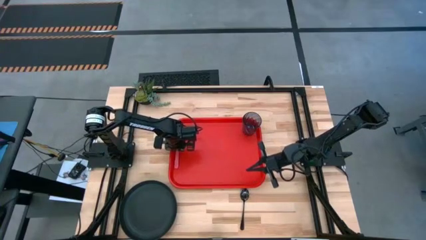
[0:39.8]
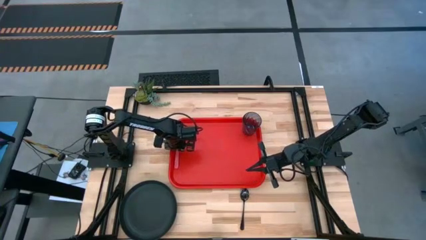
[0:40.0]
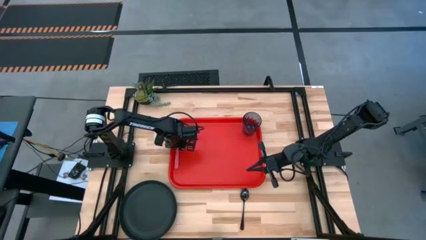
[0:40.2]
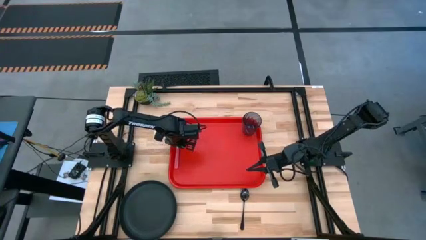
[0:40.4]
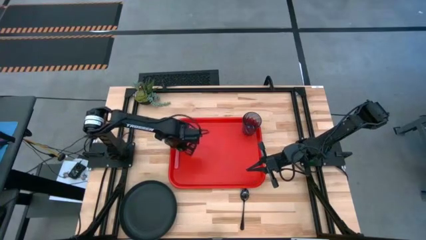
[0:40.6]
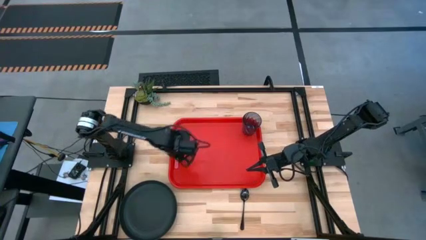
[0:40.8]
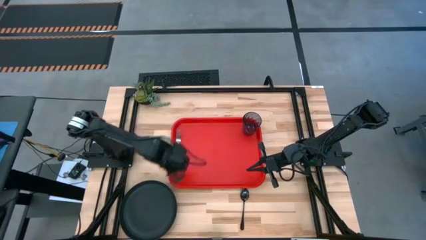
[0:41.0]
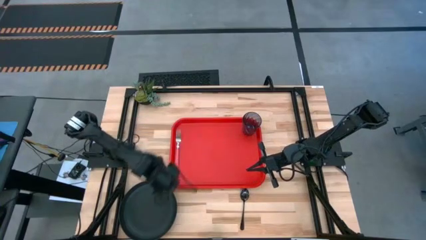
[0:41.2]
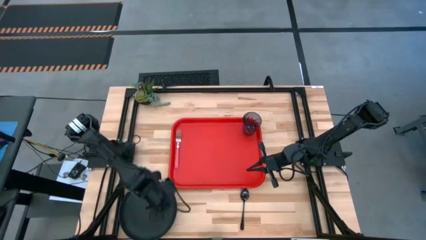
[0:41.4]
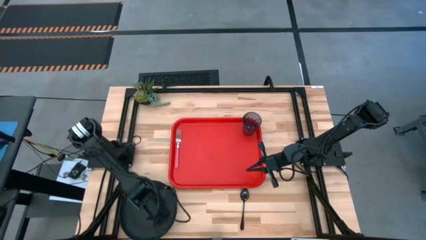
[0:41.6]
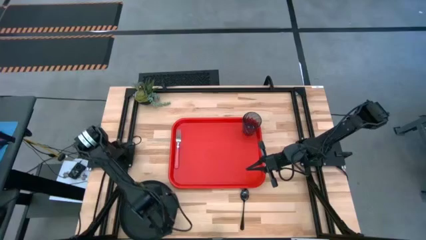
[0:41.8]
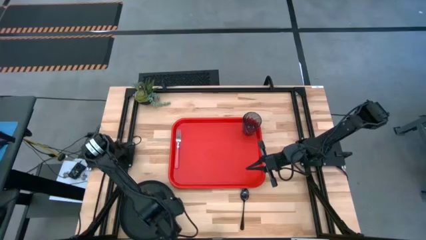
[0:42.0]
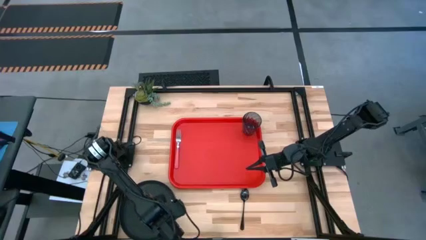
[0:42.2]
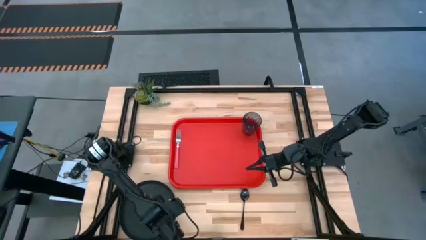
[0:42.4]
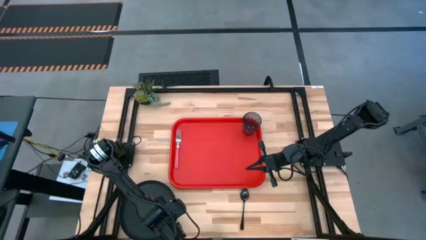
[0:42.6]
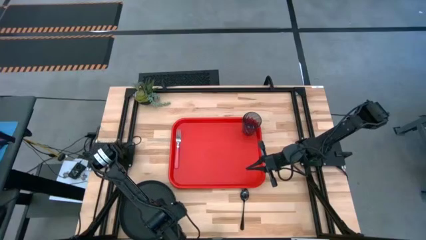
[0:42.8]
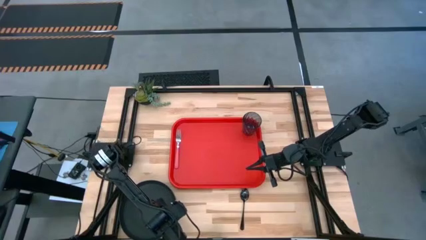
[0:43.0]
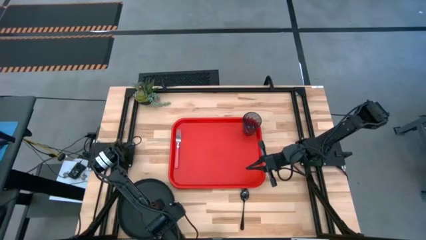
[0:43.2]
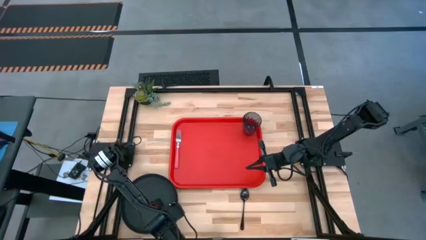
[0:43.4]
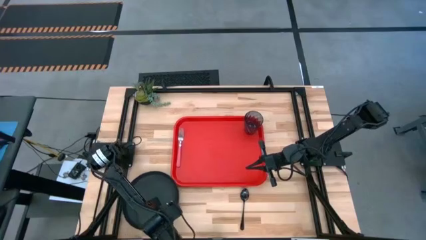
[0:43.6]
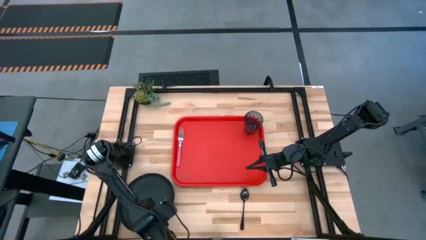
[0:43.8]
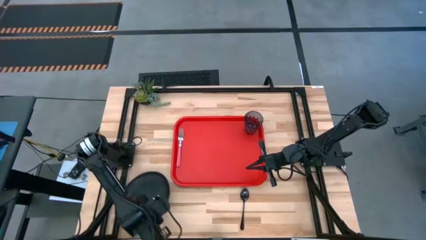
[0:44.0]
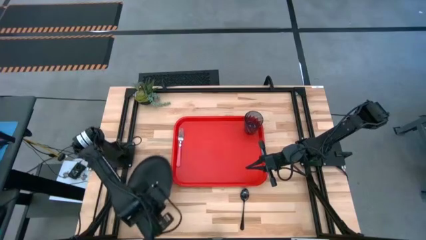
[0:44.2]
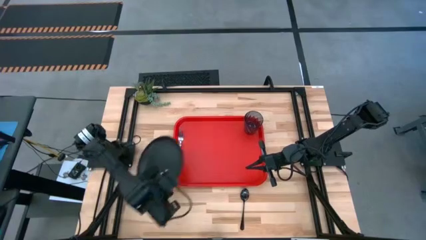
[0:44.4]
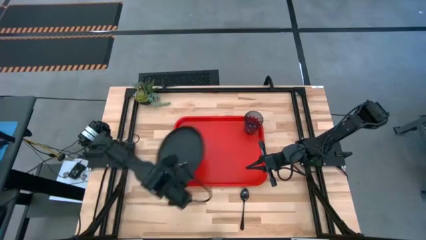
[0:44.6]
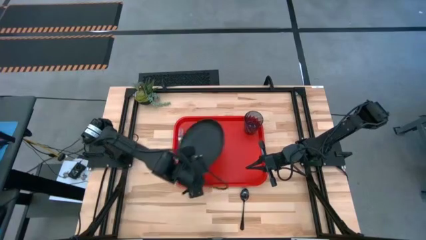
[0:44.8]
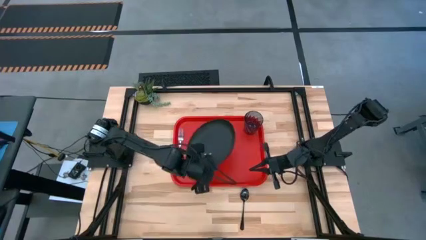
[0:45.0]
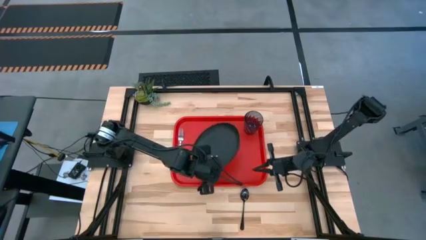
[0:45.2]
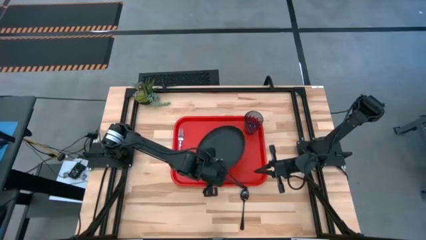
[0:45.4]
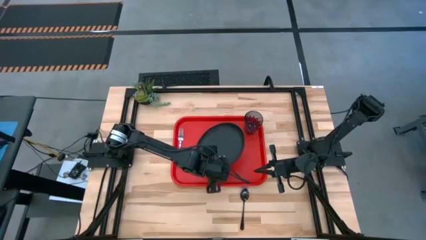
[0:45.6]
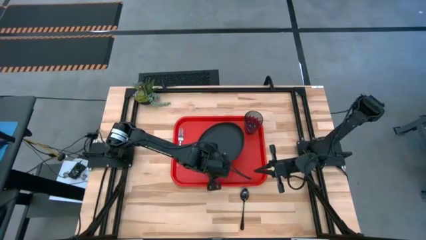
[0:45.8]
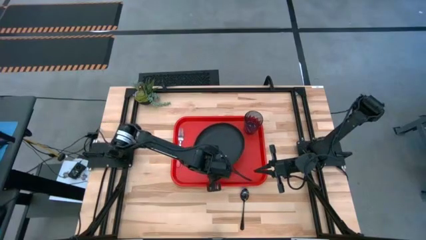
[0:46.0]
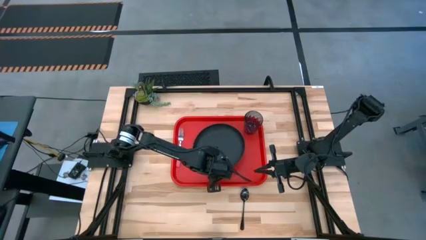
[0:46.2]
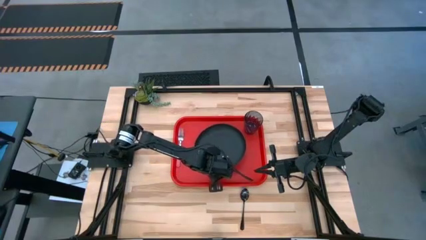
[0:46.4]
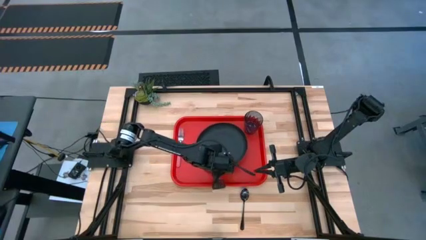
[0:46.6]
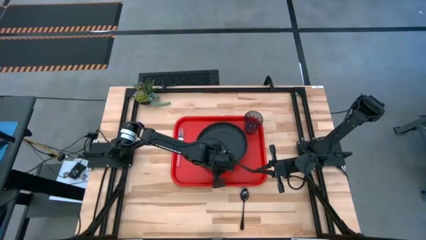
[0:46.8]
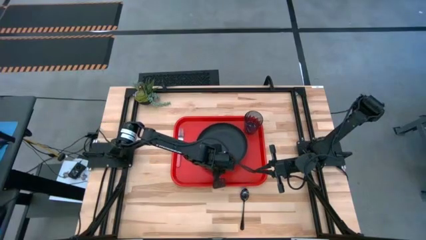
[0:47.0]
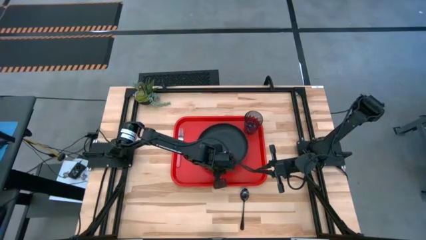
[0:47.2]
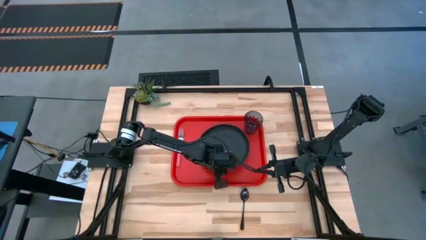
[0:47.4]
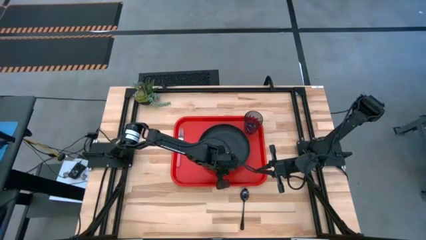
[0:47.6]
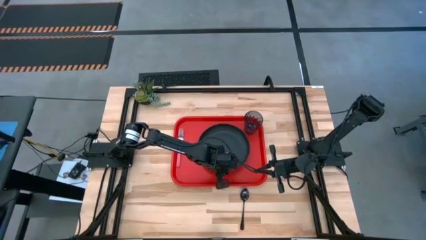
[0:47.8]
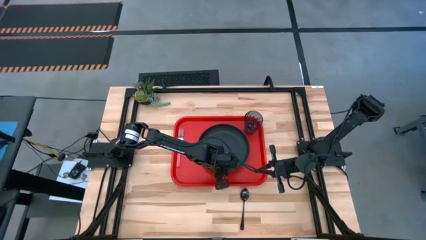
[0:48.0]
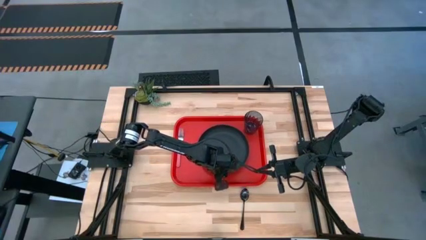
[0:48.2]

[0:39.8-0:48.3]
Task: Pick and place plate/cup/fork/spoon on tray
Put the black plate to the right of the pink fork on the red tray

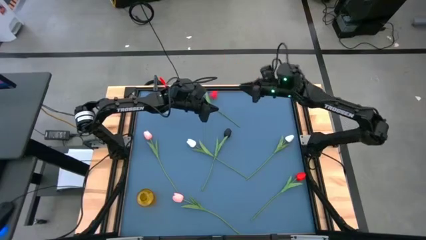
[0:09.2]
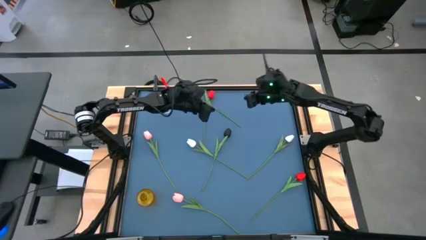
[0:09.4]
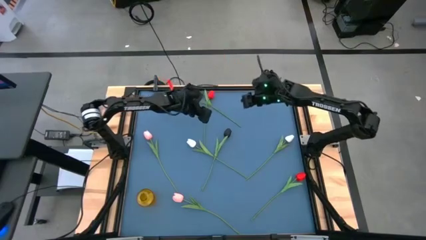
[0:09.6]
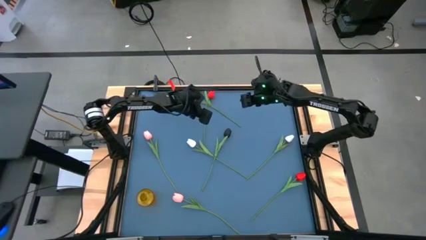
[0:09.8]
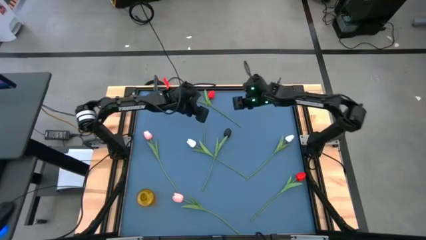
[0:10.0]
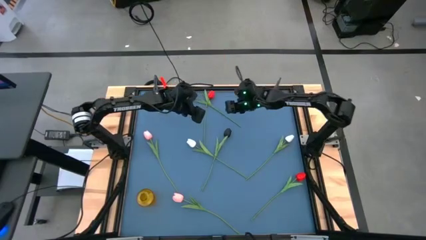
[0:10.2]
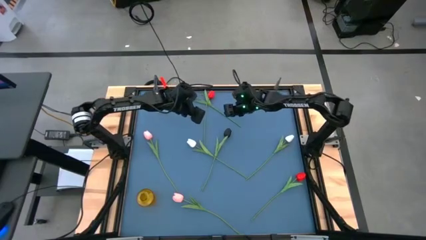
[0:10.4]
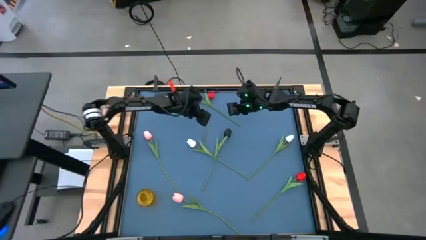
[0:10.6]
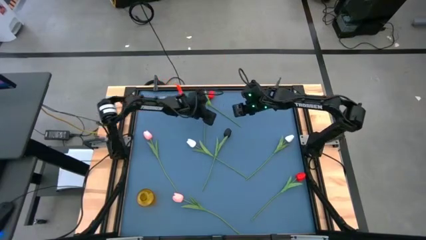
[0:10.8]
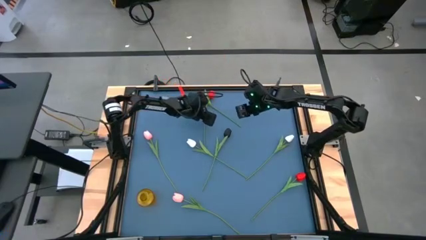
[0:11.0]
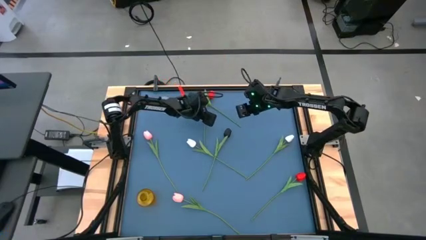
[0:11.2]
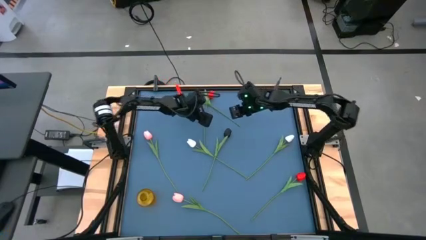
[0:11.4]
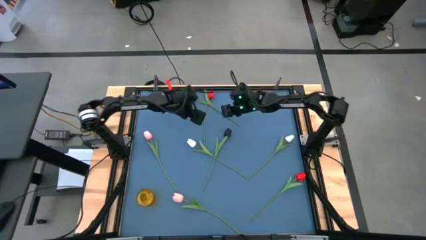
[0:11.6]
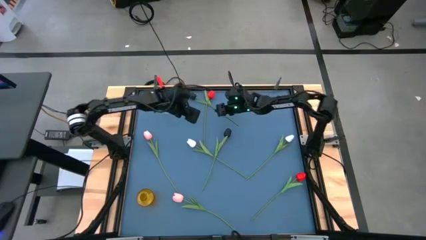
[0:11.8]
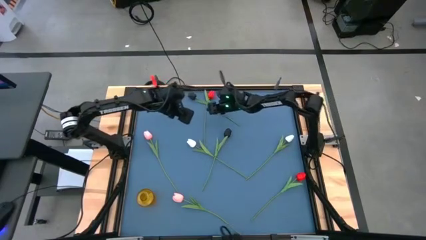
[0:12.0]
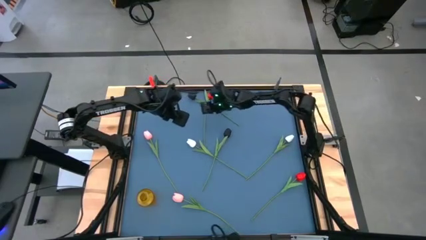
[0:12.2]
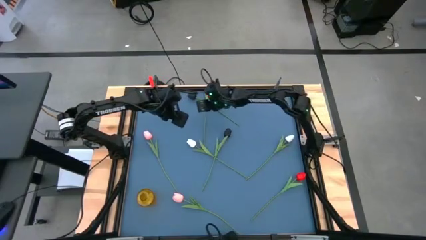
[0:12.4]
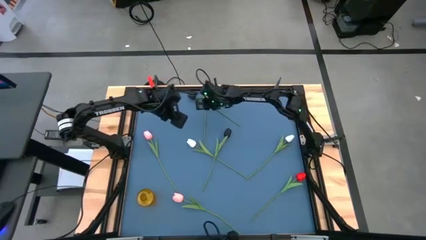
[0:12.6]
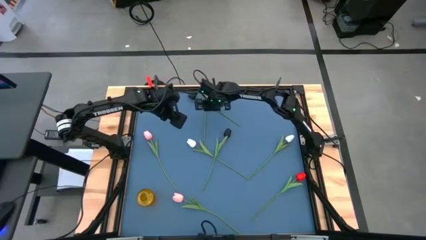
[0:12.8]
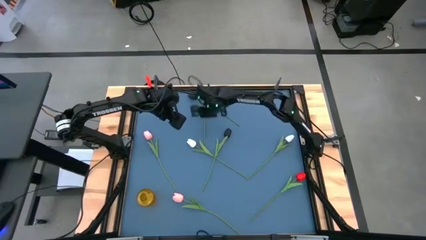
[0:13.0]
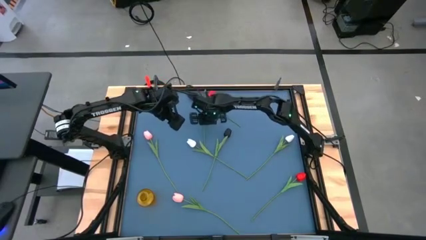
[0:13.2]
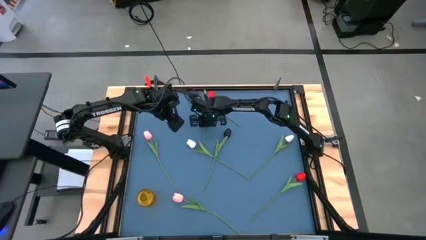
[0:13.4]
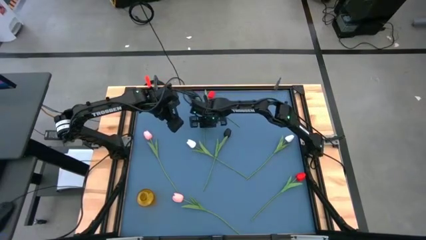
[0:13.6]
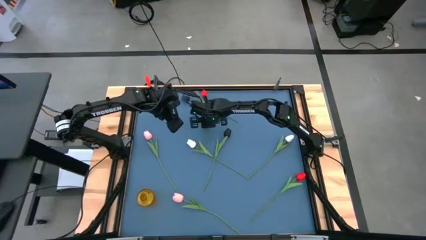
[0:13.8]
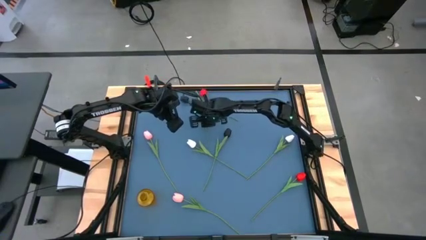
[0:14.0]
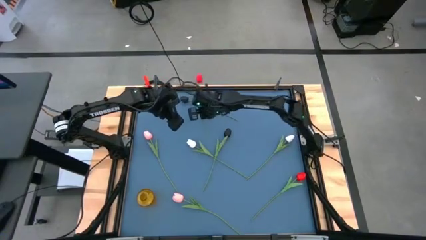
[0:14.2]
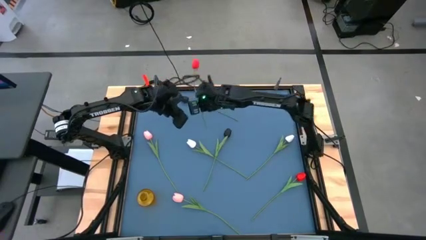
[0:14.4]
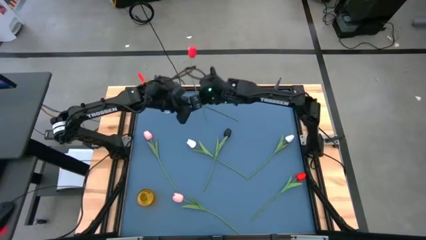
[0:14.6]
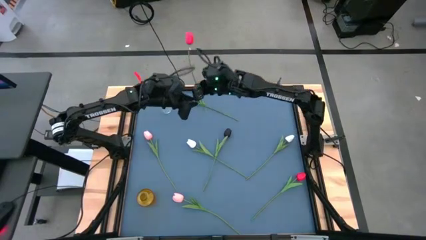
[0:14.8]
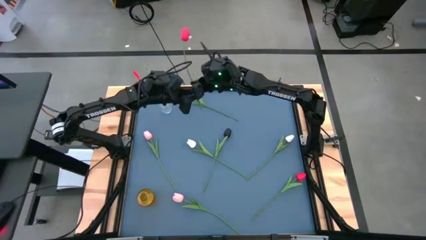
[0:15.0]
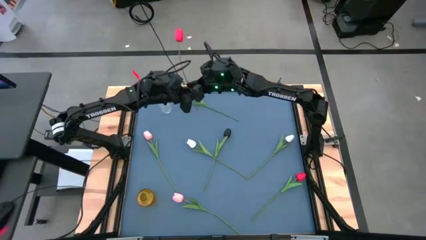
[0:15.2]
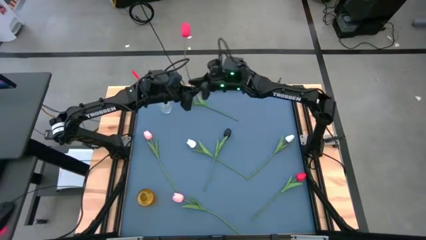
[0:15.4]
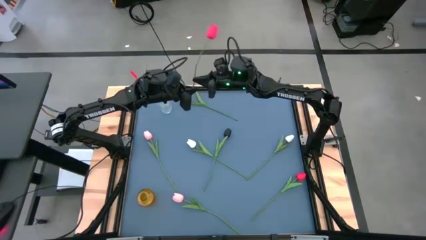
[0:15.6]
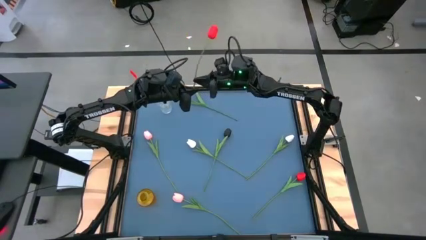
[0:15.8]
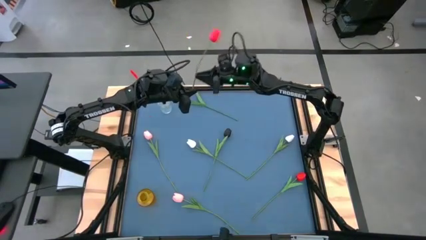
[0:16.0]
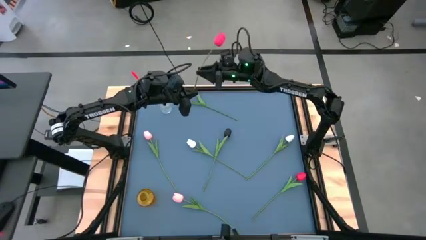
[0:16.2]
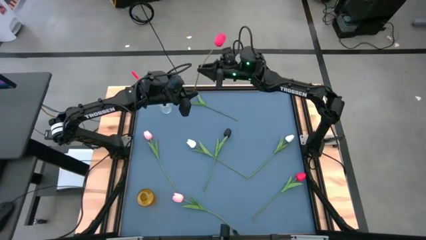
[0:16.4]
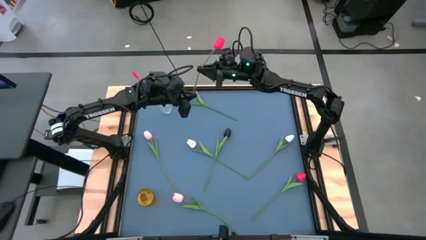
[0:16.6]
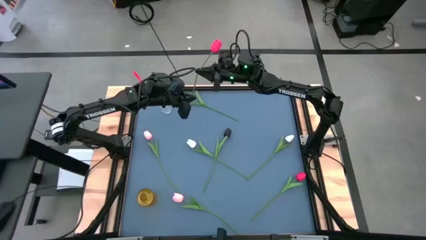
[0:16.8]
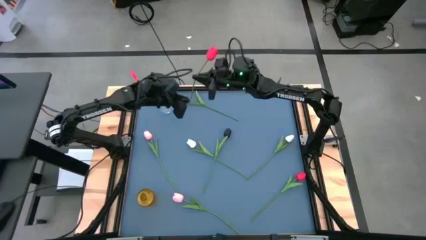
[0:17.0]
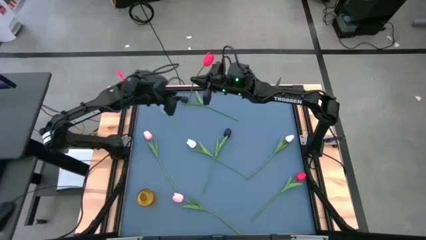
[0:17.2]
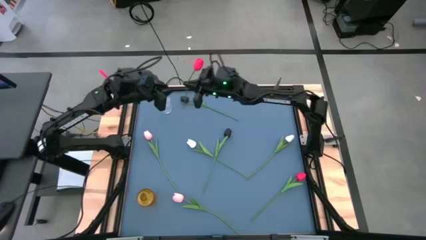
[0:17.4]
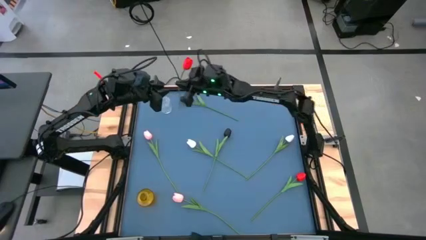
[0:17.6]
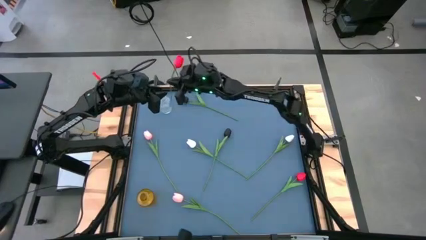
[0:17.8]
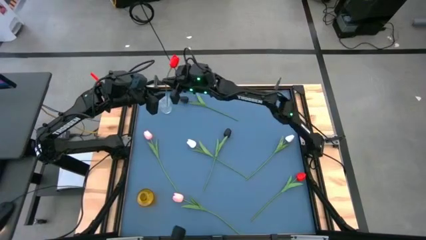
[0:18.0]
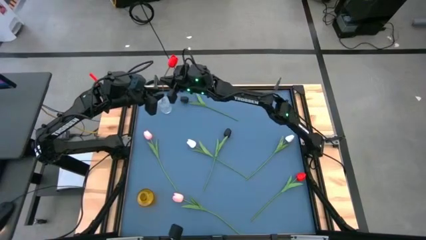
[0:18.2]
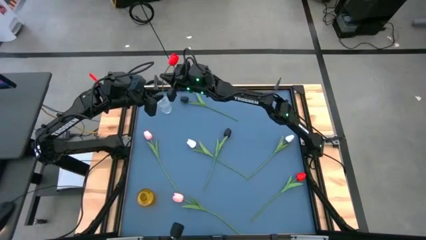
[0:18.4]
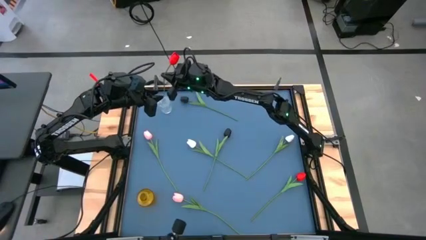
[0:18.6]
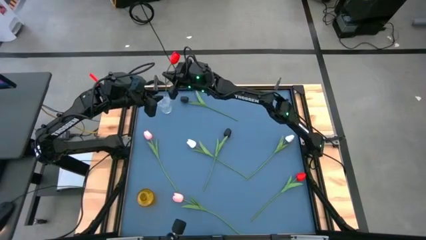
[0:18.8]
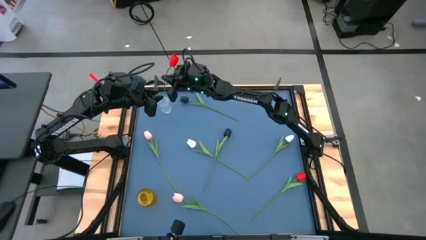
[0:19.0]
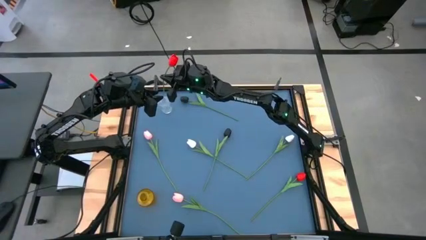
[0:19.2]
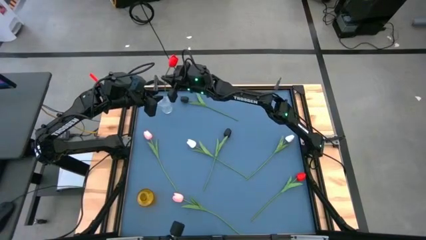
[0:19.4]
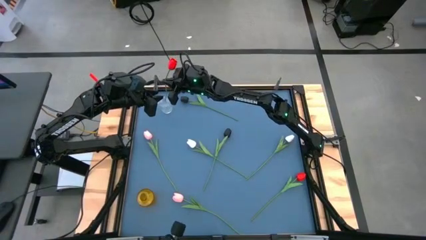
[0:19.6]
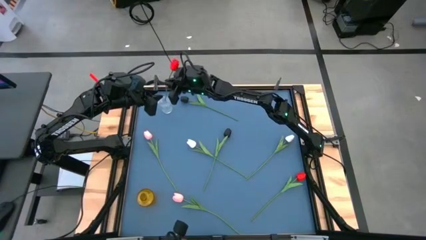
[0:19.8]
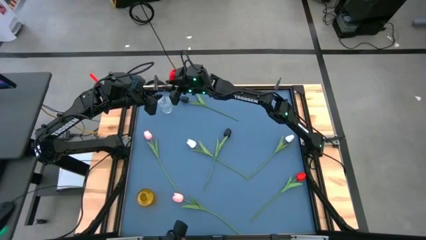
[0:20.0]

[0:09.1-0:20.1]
Task: Sort flowers into vase by color
Put the red flower into the transparent vase
